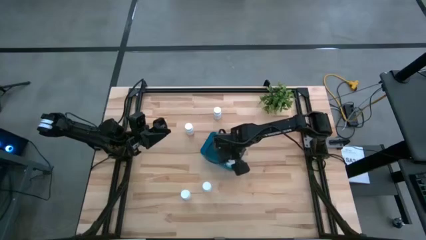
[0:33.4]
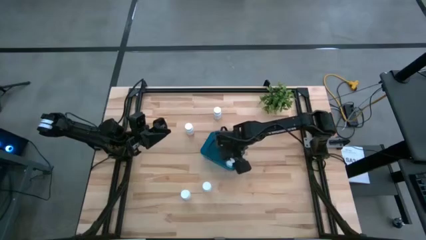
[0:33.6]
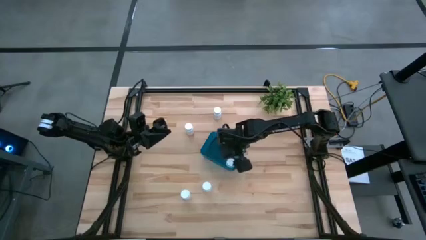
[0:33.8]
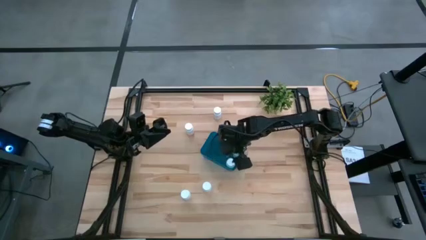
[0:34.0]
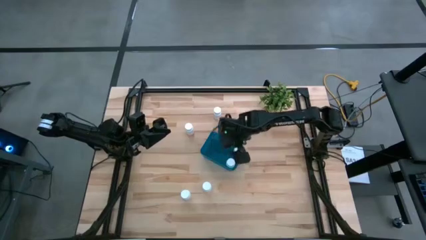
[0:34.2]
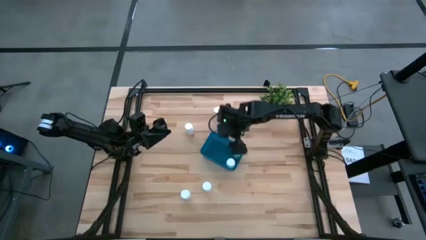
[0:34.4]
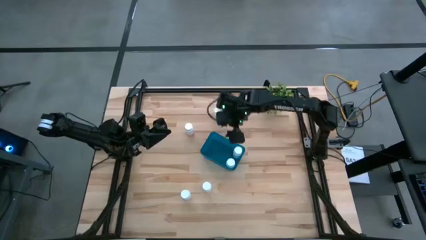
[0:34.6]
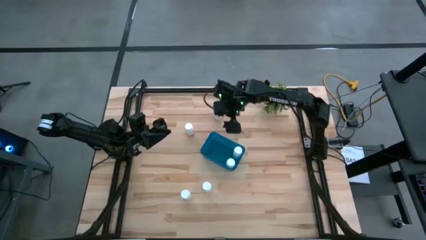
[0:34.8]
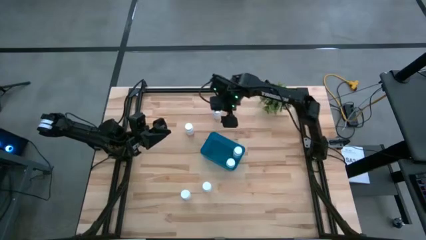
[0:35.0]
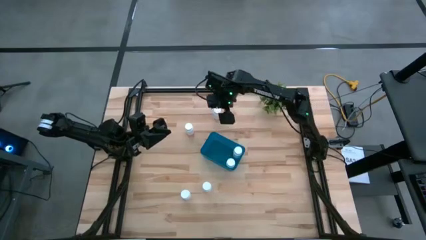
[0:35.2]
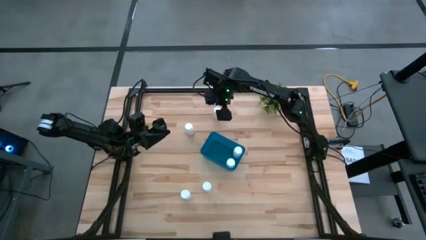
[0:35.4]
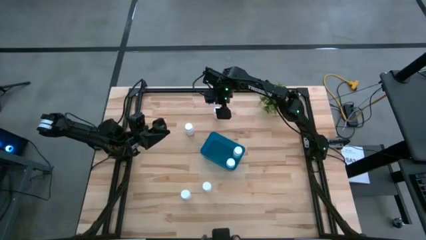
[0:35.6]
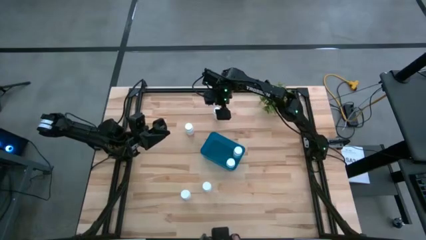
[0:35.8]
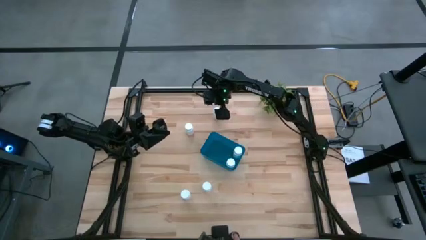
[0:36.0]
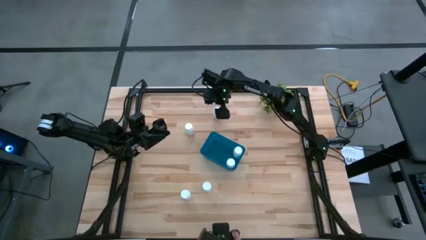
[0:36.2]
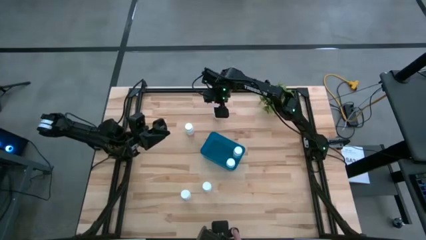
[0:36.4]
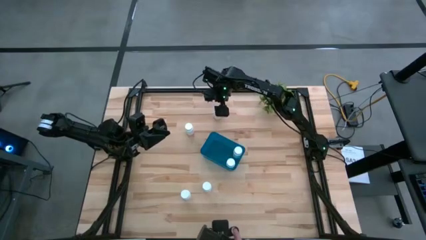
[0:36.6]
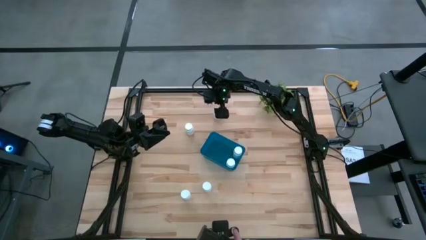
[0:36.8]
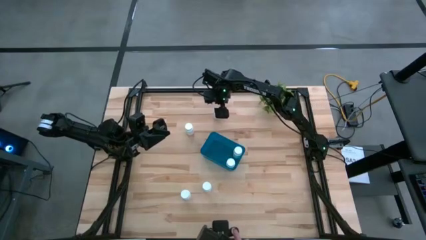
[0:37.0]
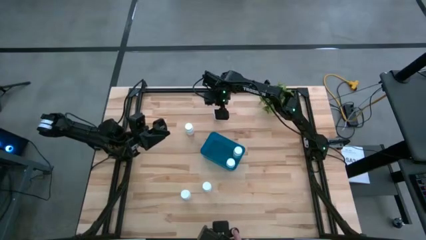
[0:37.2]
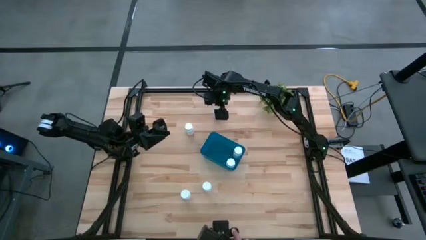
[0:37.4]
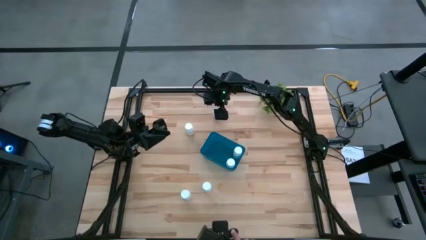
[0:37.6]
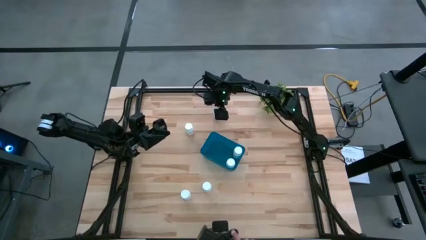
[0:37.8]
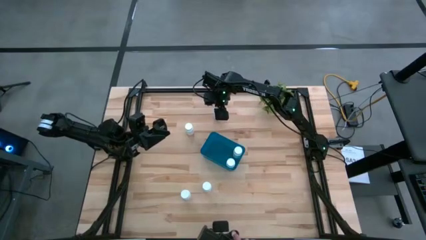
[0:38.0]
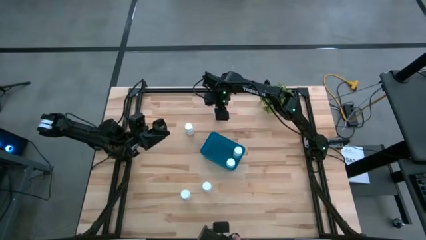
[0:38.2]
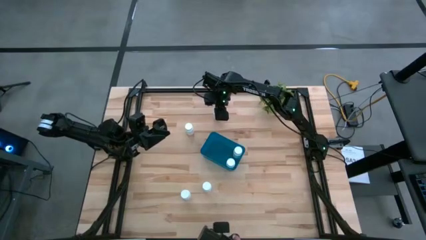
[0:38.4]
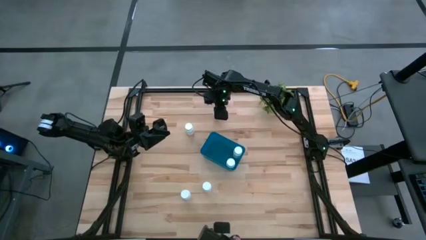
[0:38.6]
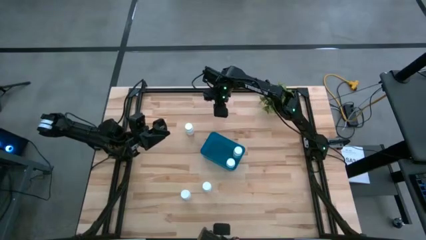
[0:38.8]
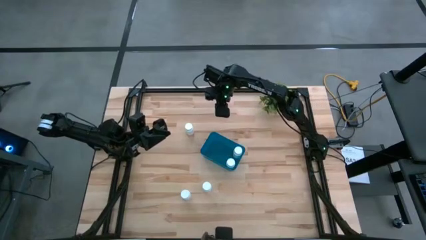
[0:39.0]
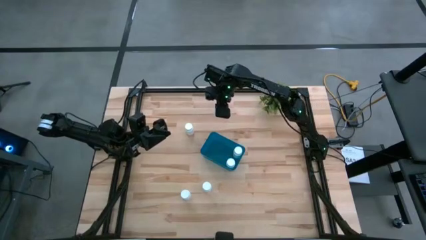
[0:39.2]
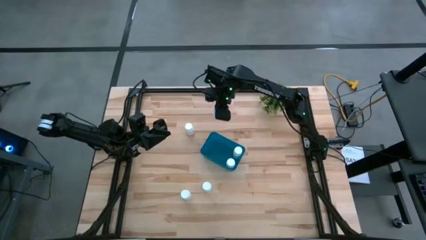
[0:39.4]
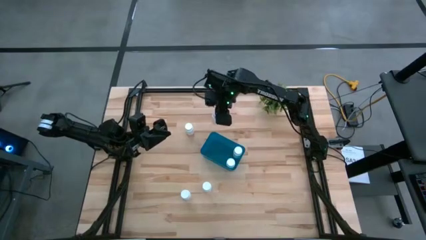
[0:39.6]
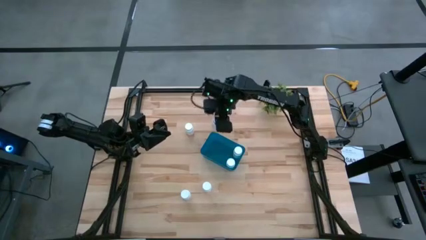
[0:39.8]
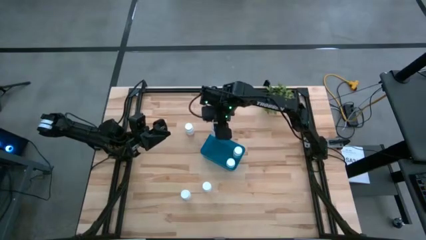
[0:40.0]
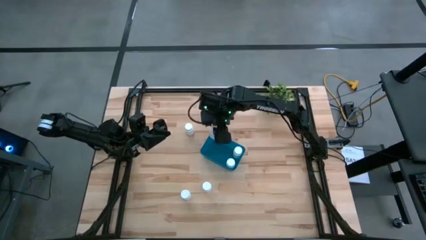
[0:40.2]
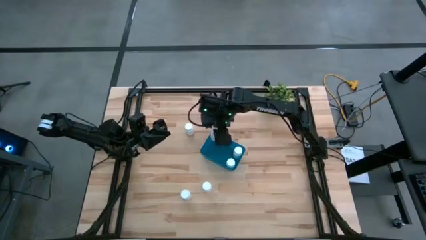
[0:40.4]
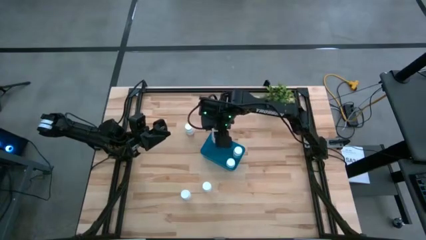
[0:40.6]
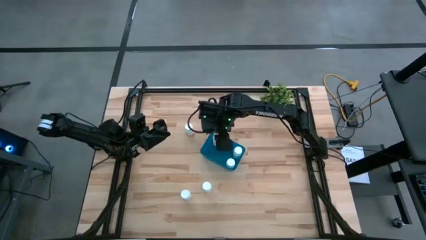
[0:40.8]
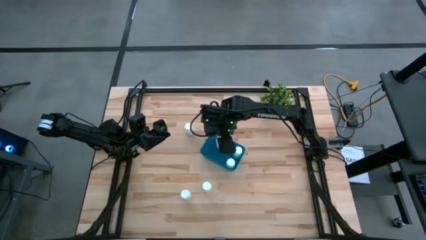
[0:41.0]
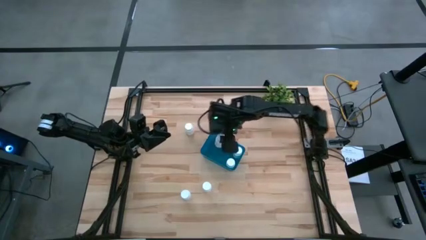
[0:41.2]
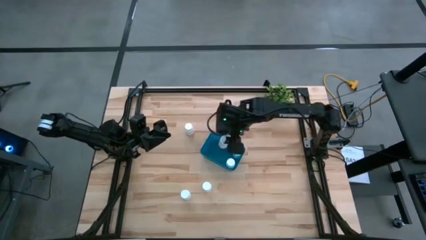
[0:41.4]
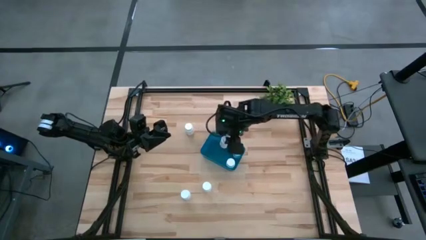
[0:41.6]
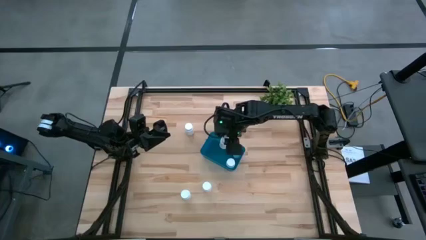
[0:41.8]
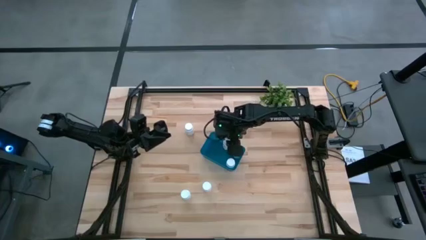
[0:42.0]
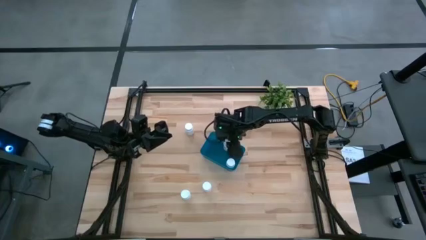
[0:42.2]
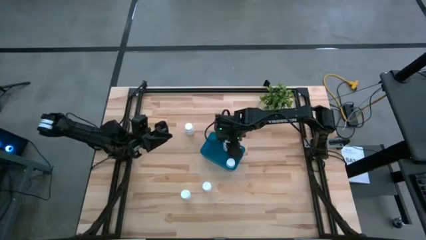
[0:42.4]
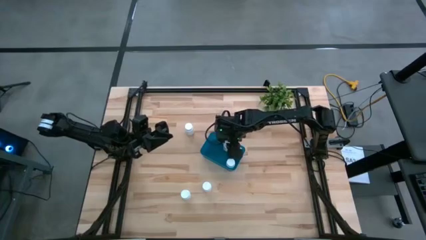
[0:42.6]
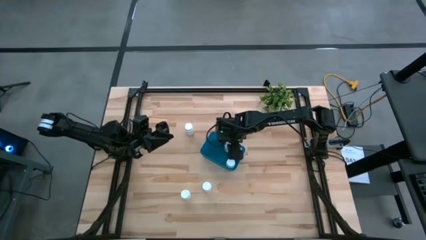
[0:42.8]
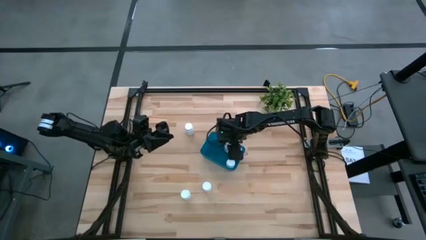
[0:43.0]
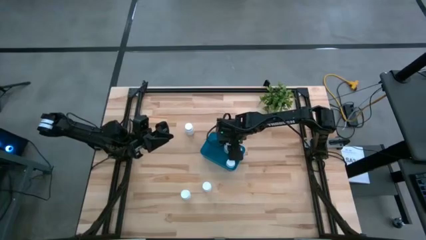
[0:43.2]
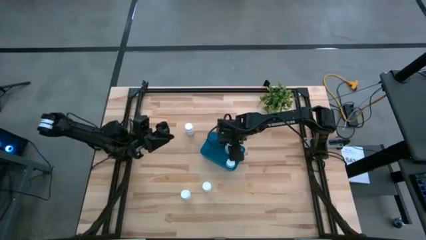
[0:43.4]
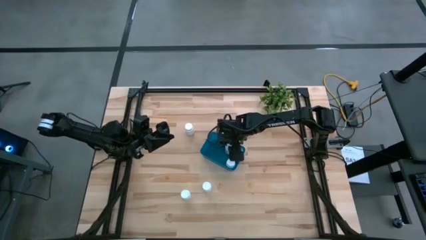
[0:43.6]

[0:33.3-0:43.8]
Task: Pick and place pill bottles into a basket
Put the white pill bottle into the blue bin
